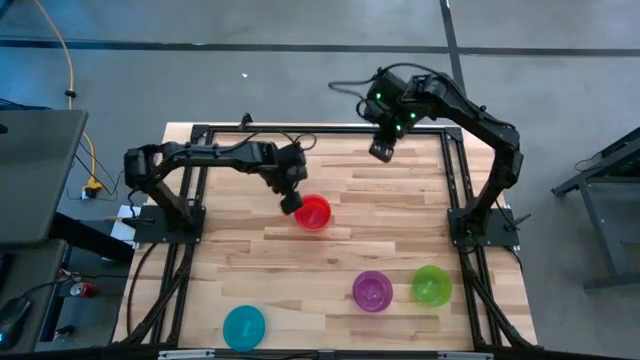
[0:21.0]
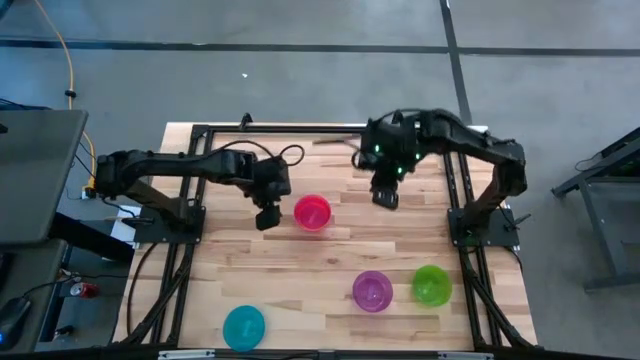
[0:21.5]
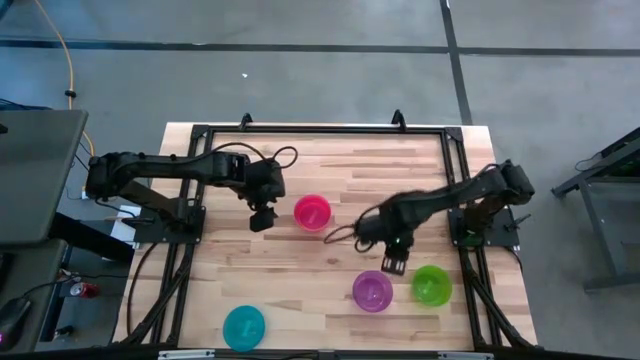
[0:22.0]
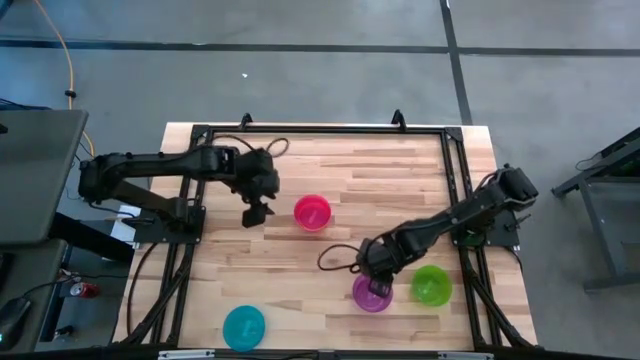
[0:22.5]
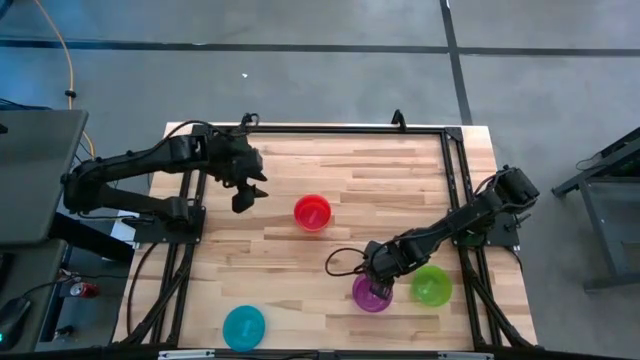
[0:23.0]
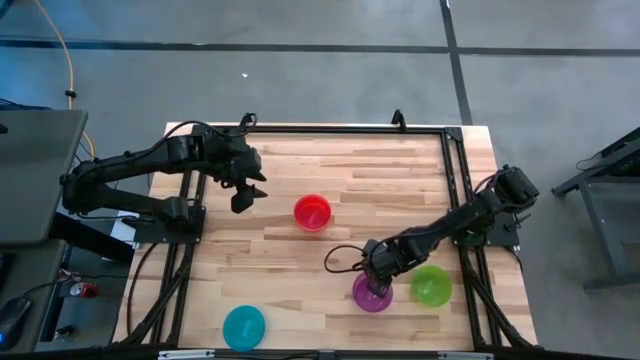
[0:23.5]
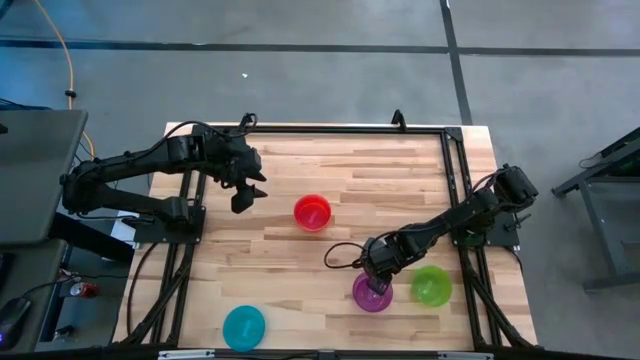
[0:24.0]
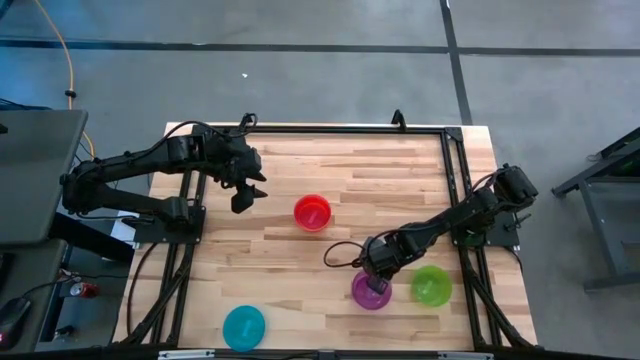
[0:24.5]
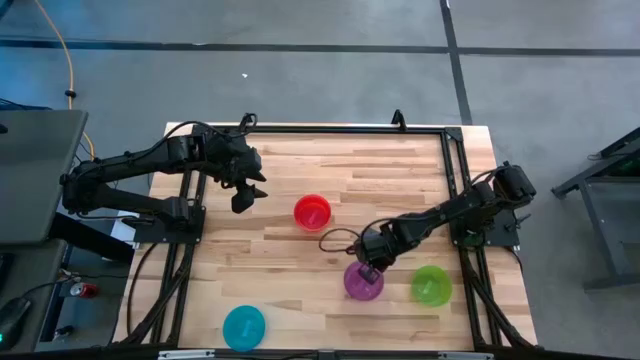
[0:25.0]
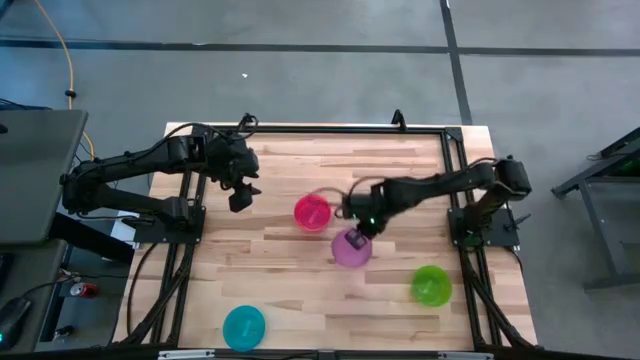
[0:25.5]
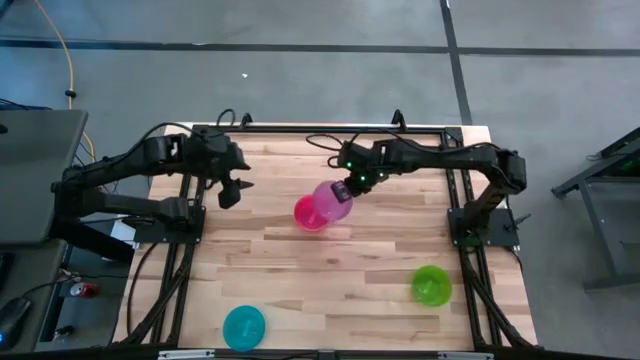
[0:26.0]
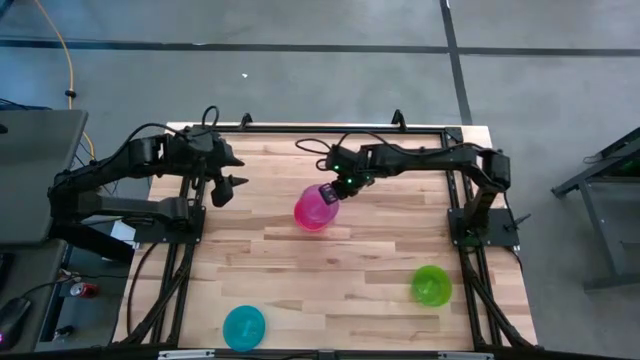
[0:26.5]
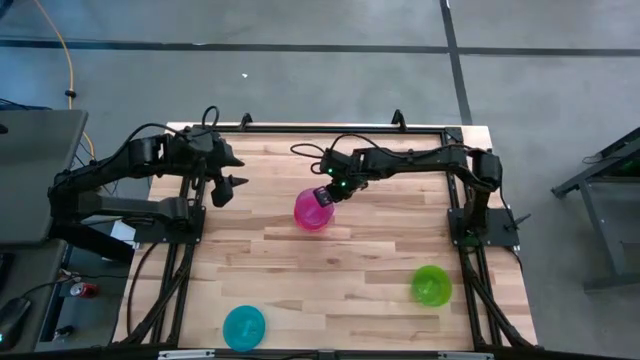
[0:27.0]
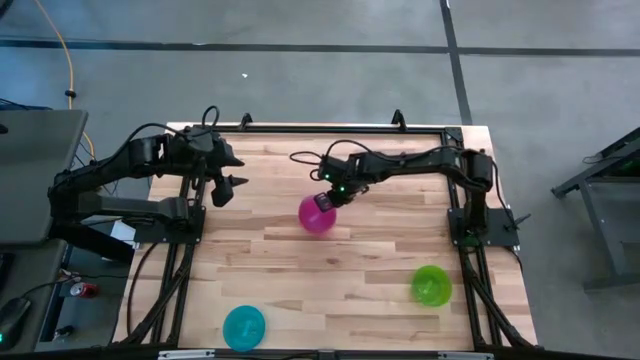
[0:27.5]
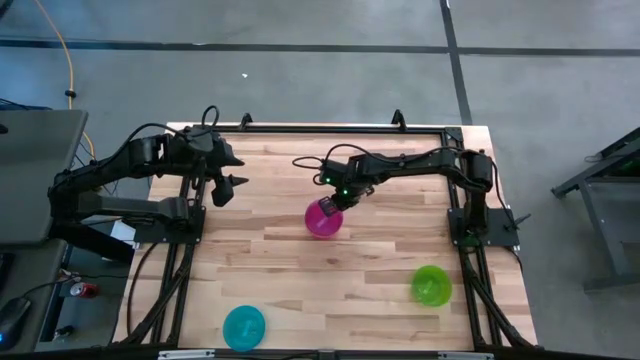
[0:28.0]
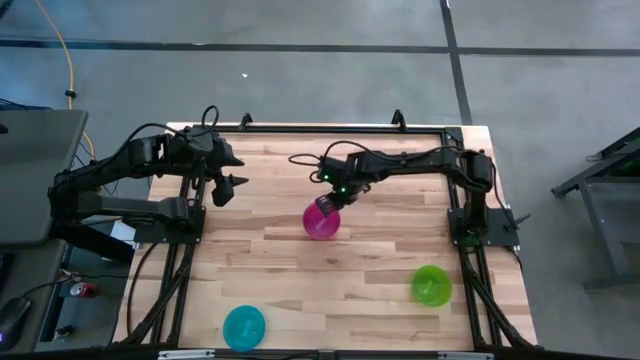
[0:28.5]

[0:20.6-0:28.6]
Task: Nest bowls inside each other
Stack the violet bowl on top of the pink bowl

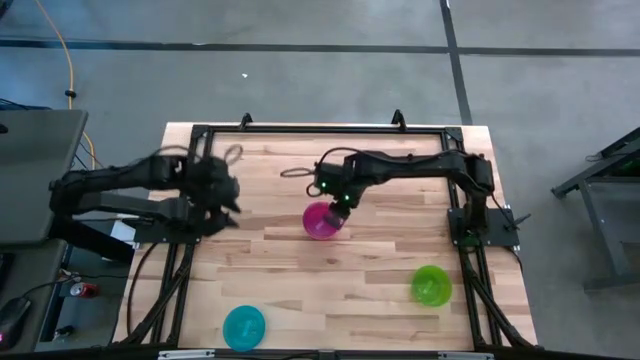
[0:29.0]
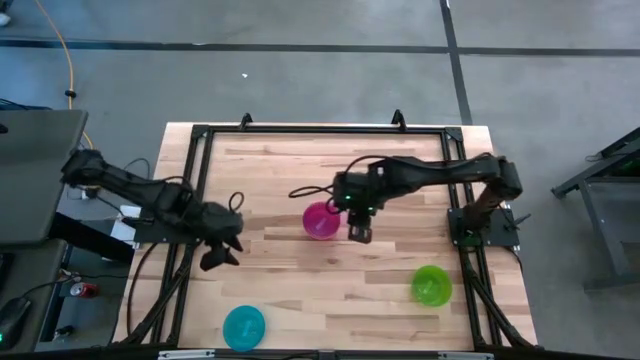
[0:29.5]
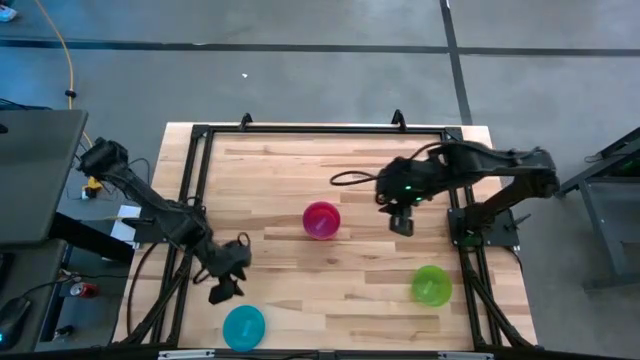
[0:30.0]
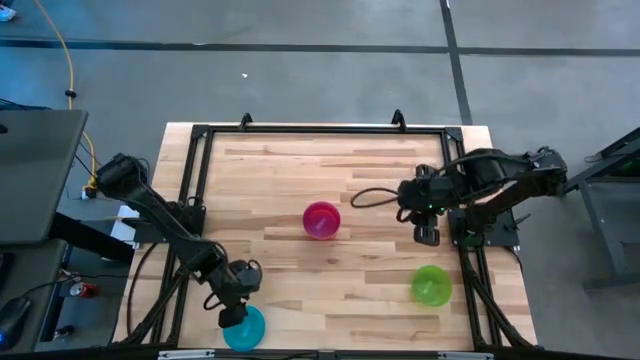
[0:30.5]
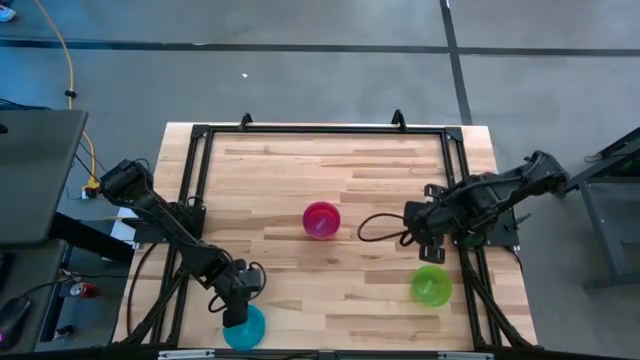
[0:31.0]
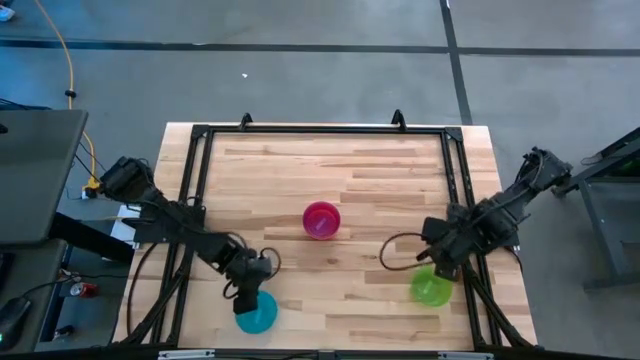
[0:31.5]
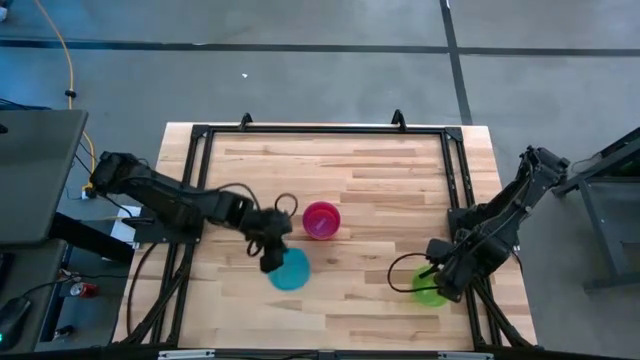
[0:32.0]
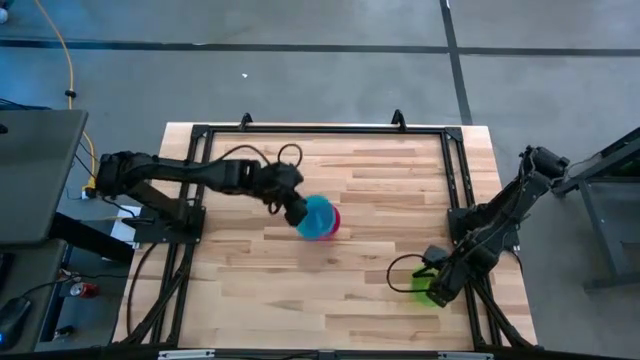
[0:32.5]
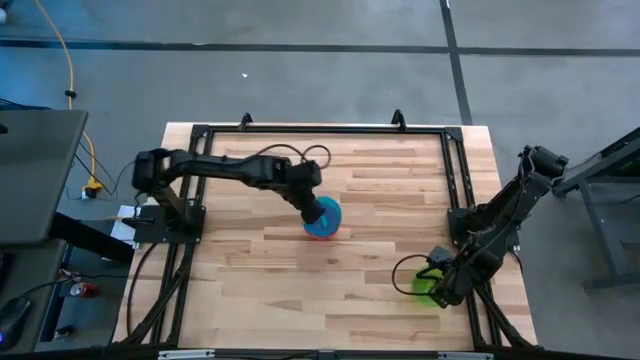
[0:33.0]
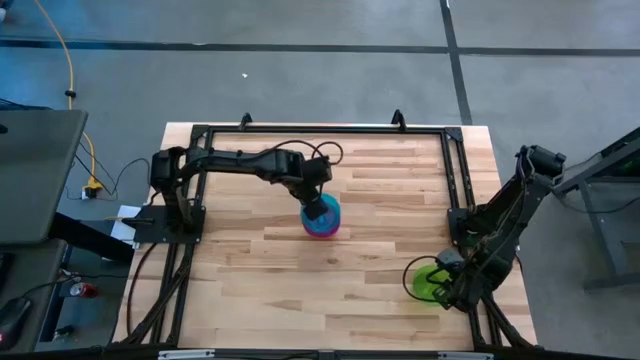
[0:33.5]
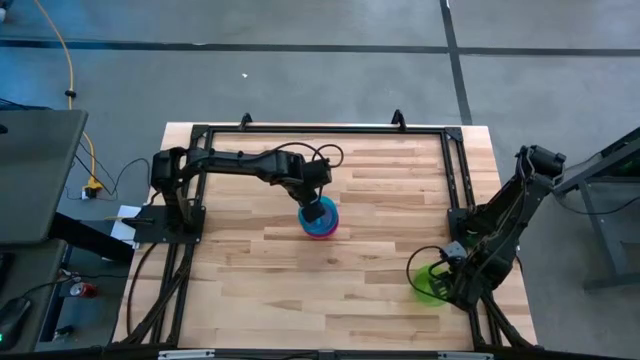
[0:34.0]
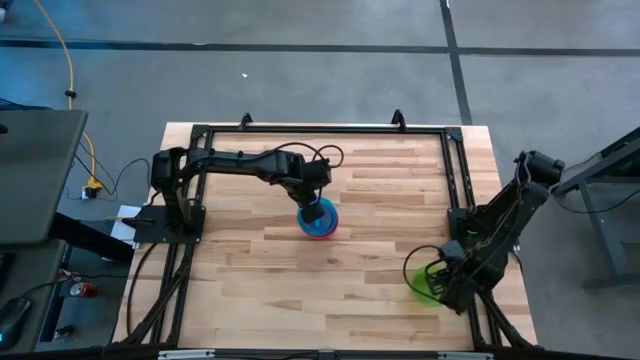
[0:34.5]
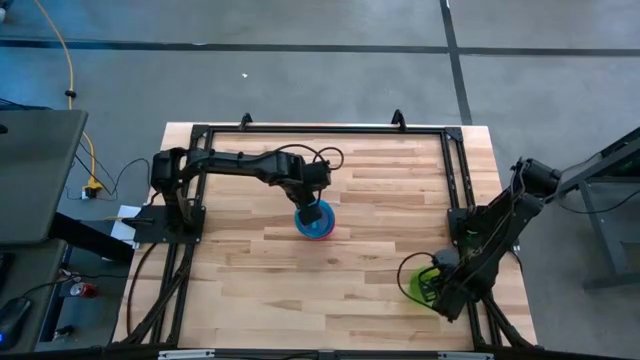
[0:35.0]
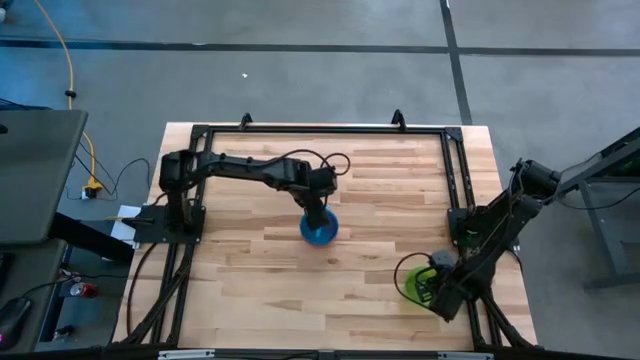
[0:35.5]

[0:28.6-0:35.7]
Stack the blue bowl on top of the violet bowl

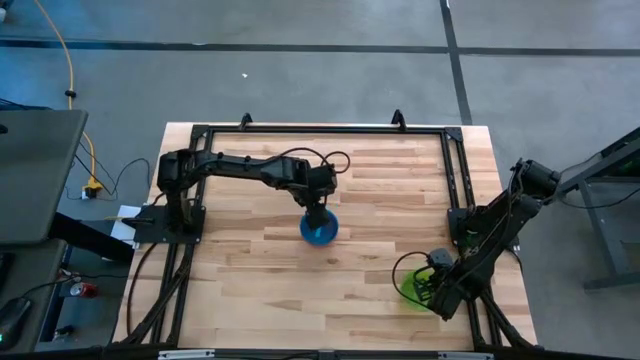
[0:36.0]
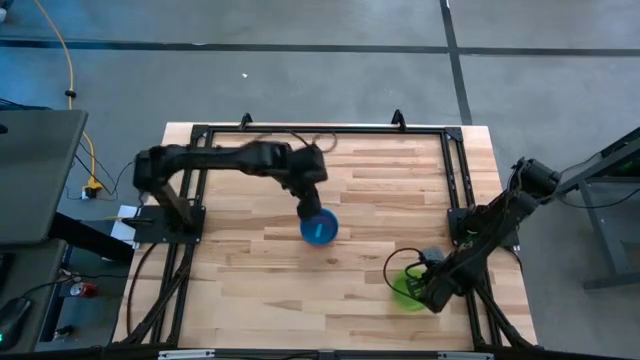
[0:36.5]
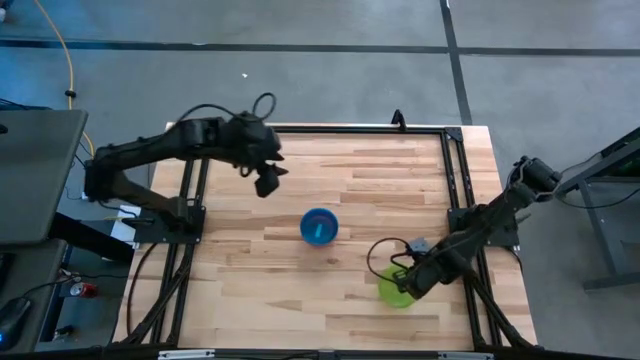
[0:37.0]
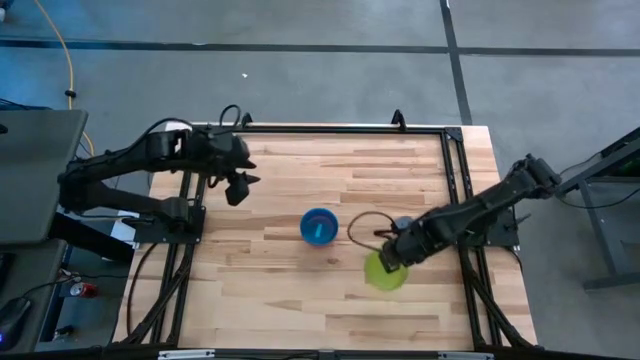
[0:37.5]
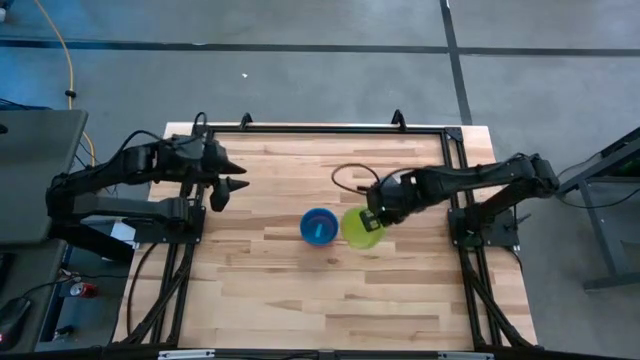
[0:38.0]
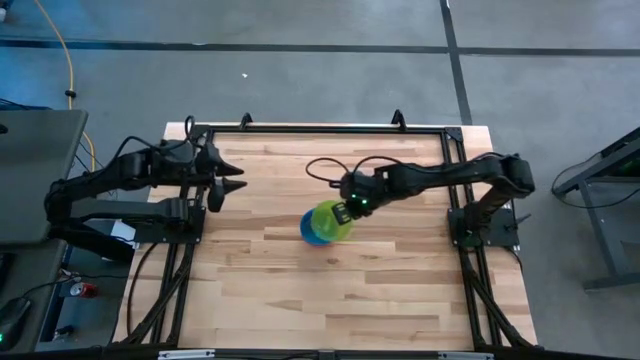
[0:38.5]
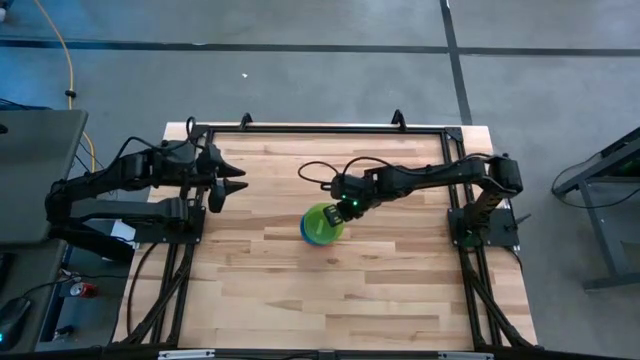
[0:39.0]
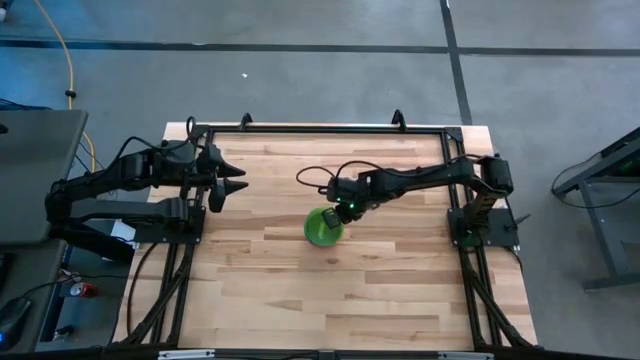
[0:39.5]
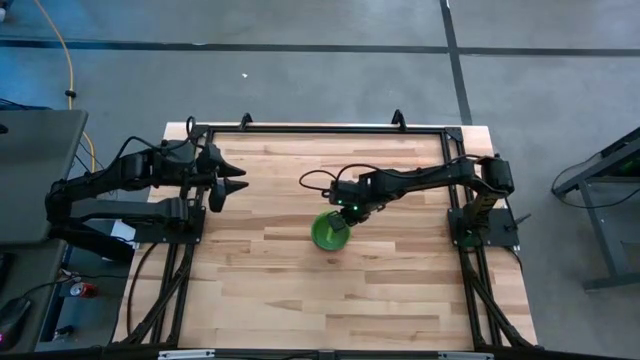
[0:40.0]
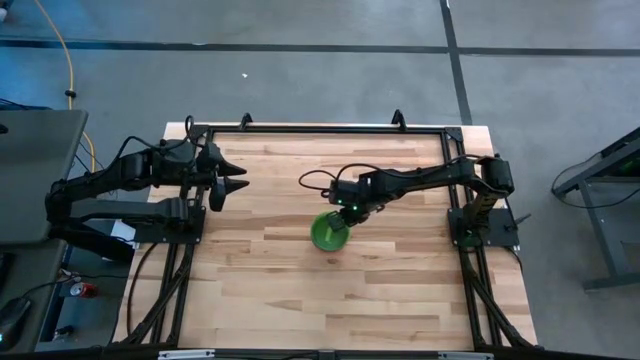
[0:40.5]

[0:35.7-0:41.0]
Stack the green bowl on top of the blue bowl

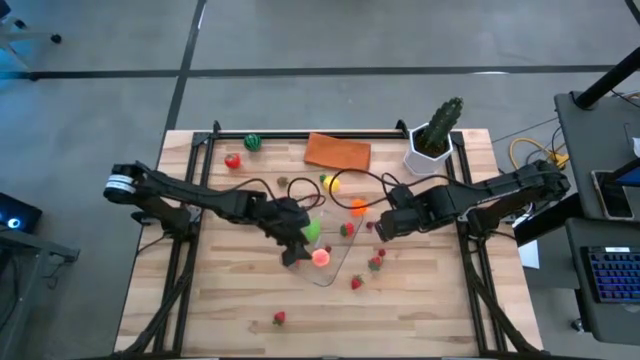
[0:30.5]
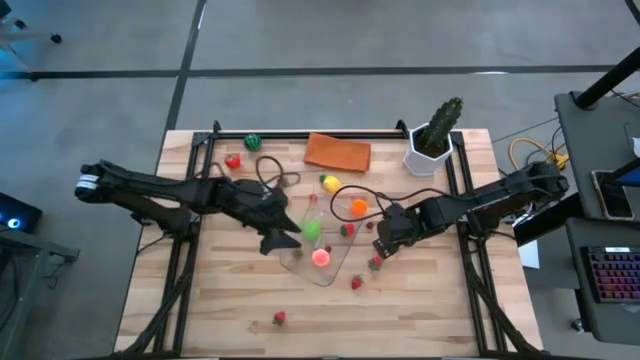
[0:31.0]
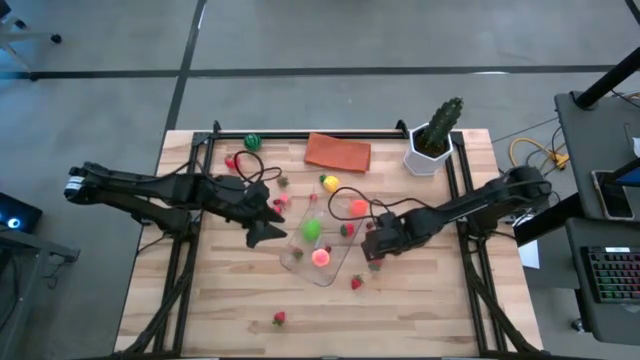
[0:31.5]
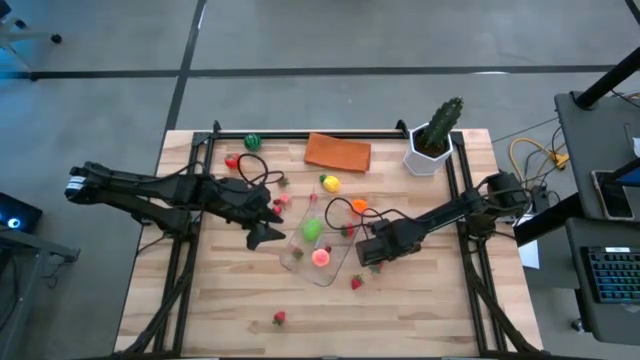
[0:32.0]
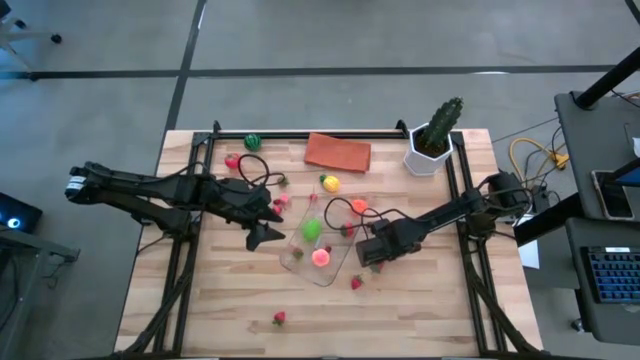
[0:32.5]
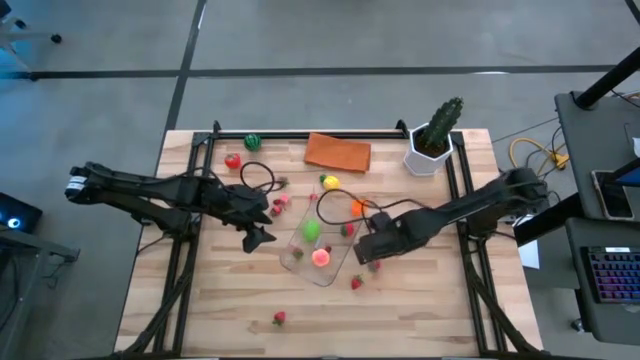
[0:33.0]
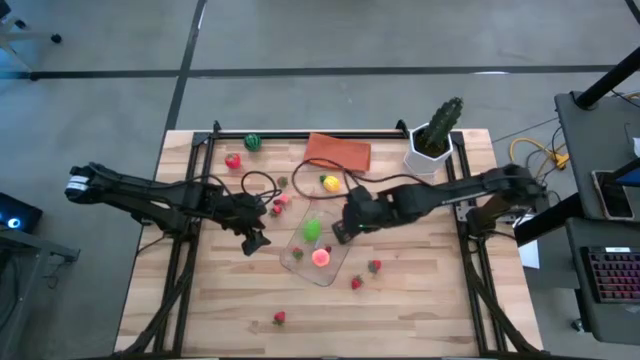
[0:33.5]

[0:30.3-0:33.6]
Task: Pick and placing Produce into tupperware
Put the cherry into the transparent bin
